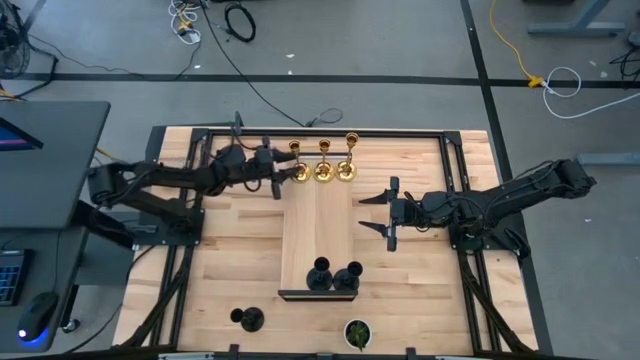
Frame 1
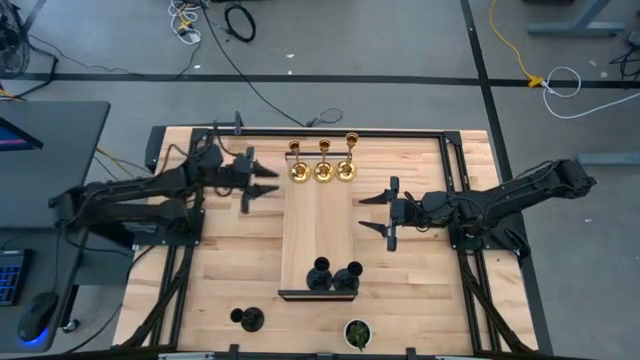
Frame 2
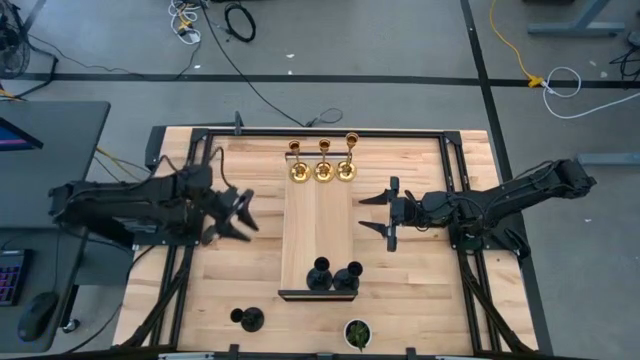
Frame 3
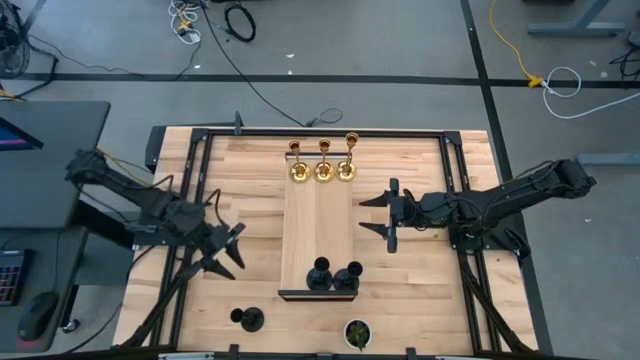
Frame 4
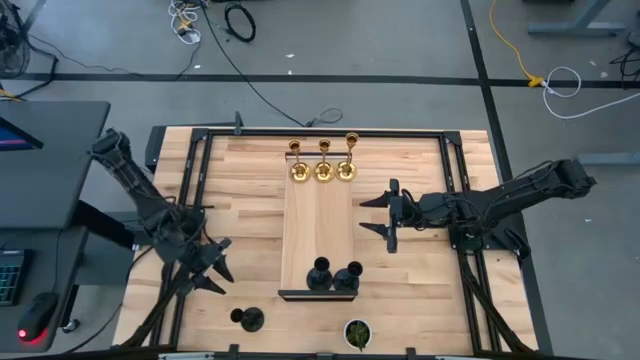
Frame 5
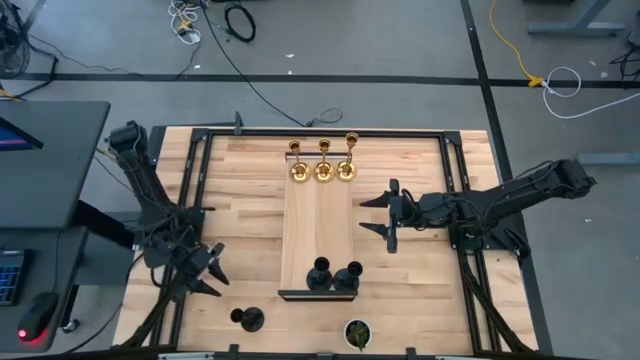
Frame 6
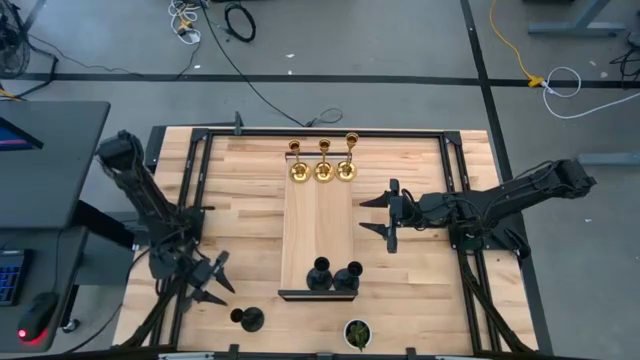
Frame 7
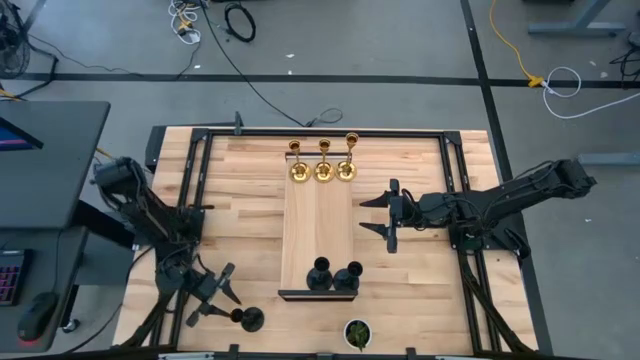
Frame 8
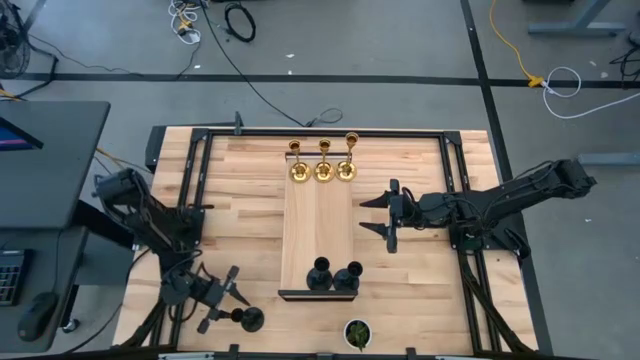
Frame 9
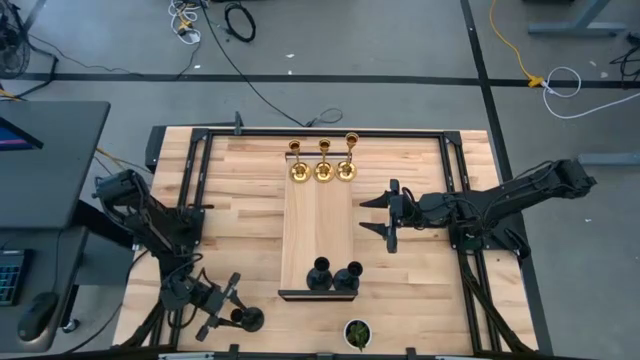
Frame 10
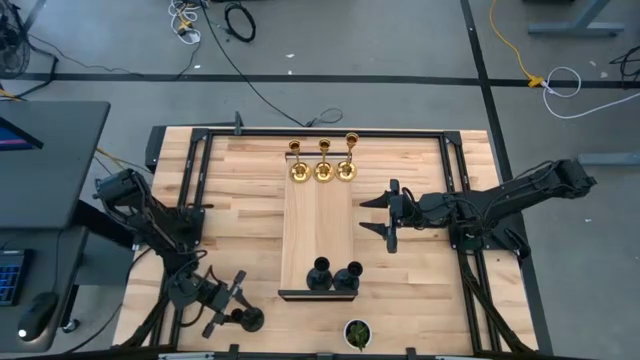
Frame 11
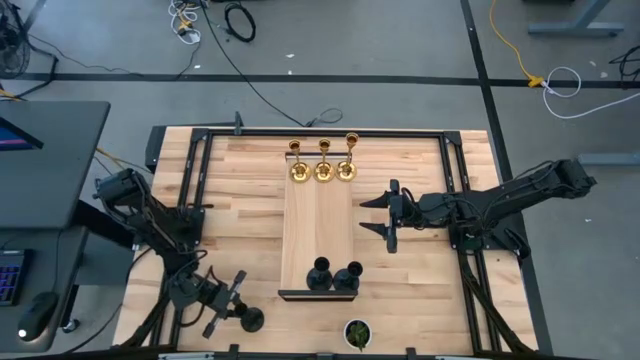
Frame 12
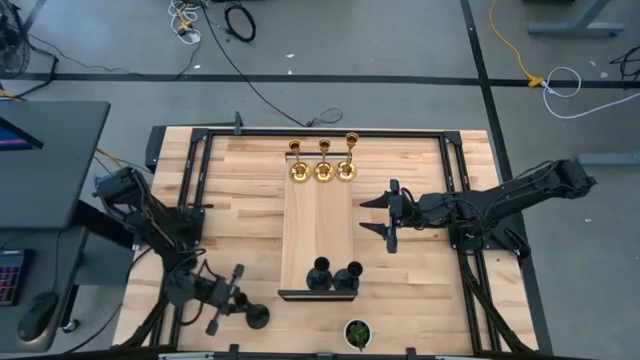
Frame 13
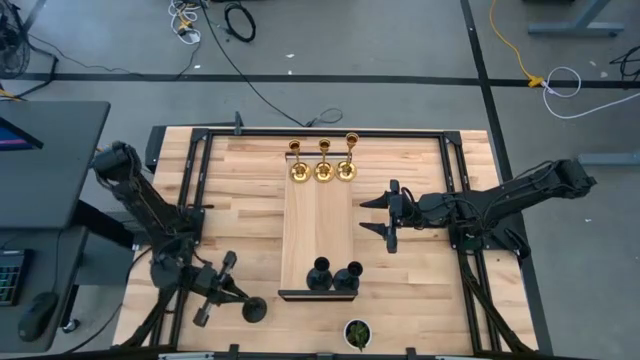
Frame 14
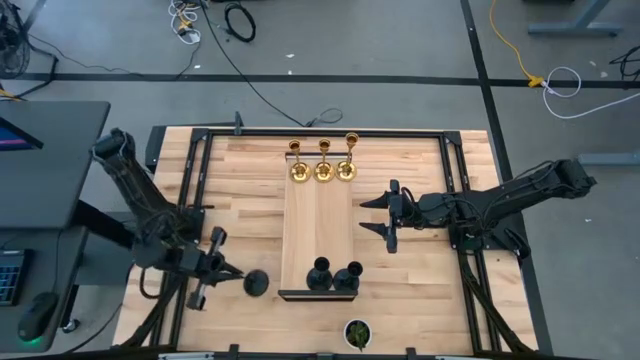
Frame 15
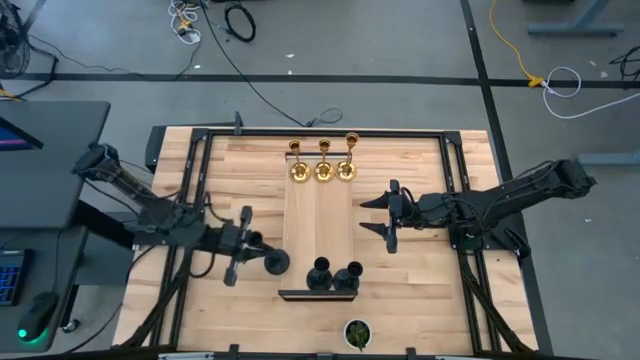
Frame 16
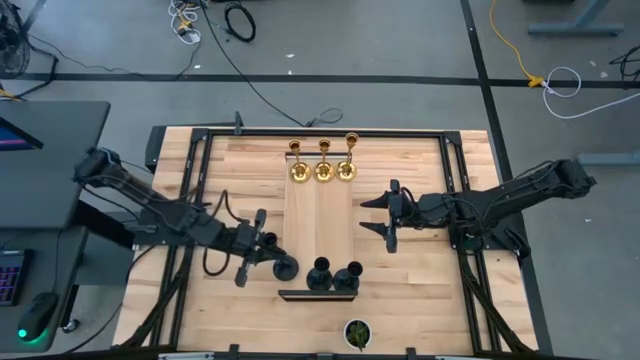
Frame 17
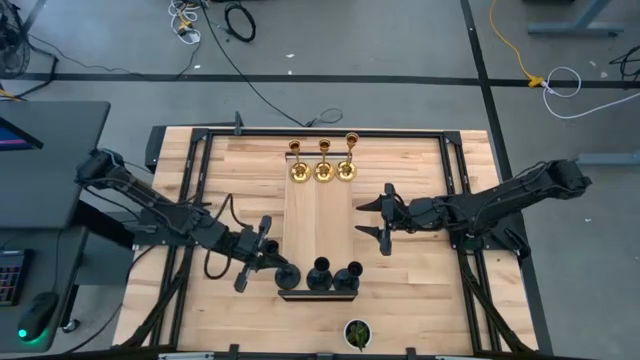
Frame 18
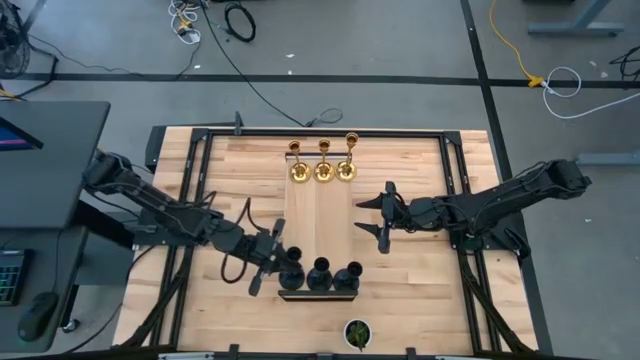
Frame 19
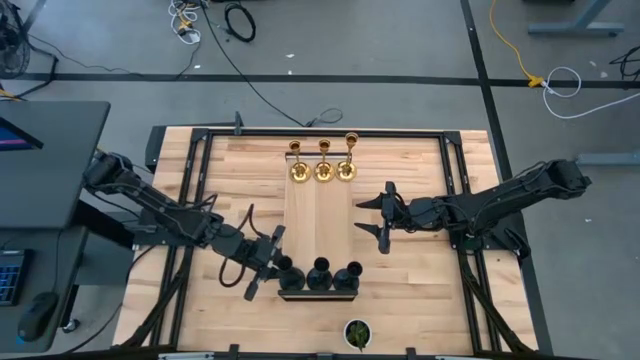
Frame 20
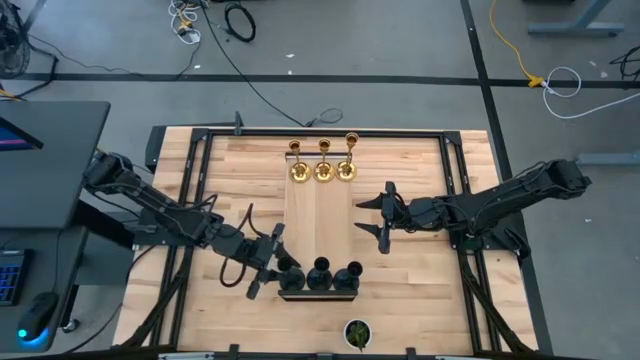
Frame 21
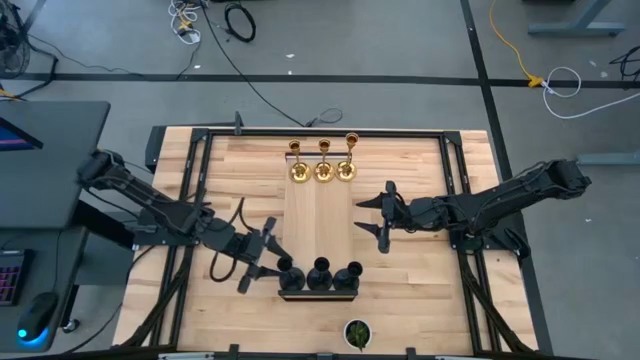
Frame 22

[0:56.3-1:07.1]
Task: Pick & Place candle stick holders
Put the black candle holder on the shelf aligned with the black candle holder

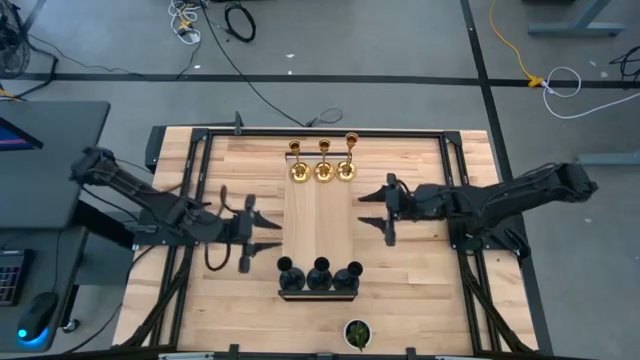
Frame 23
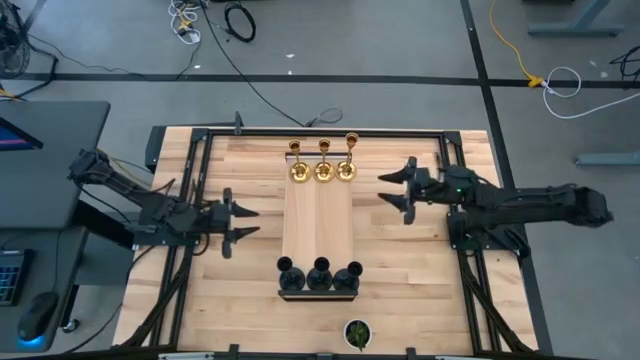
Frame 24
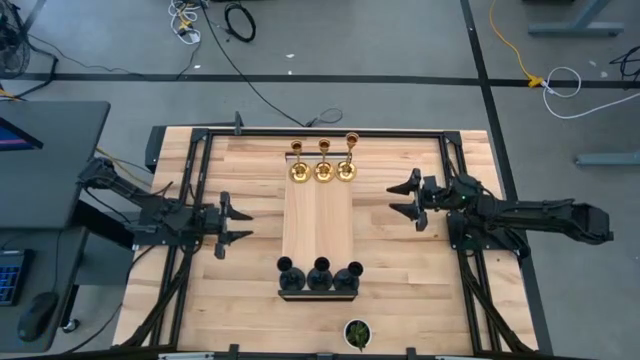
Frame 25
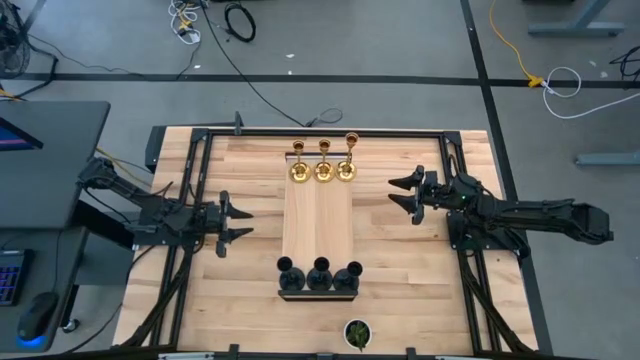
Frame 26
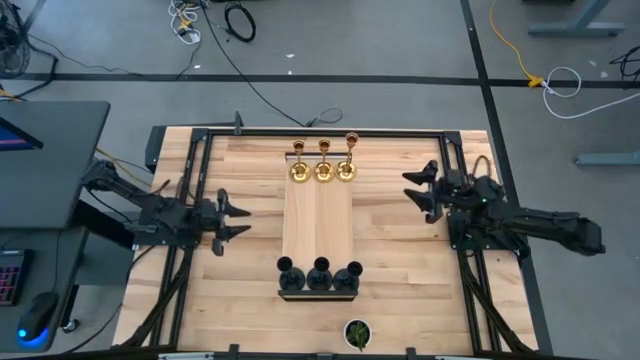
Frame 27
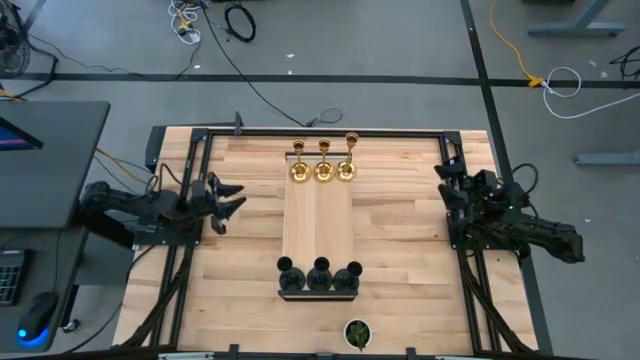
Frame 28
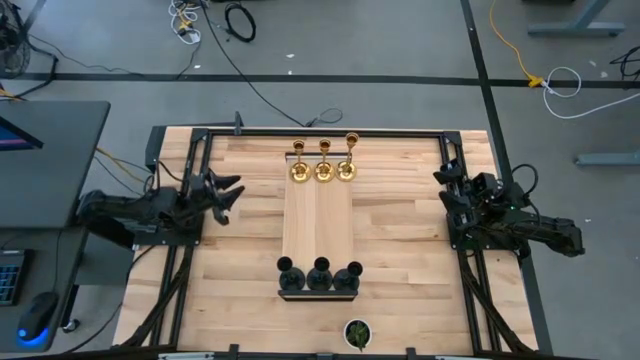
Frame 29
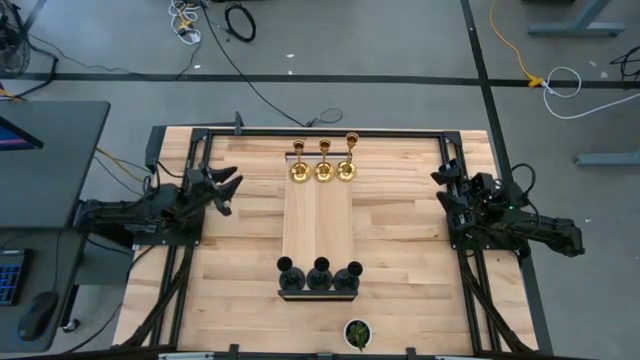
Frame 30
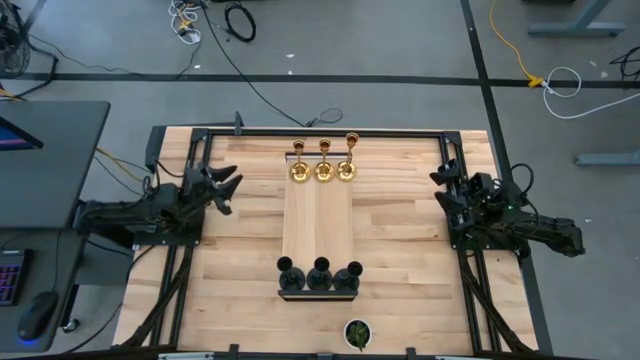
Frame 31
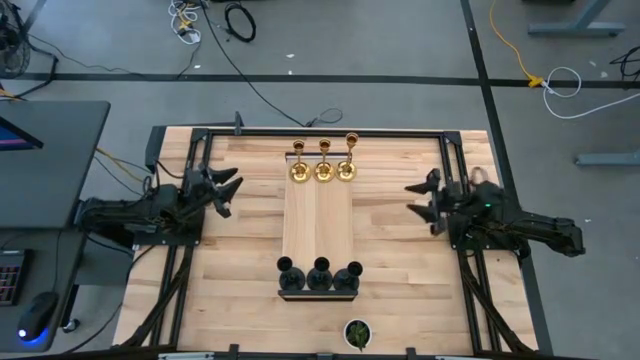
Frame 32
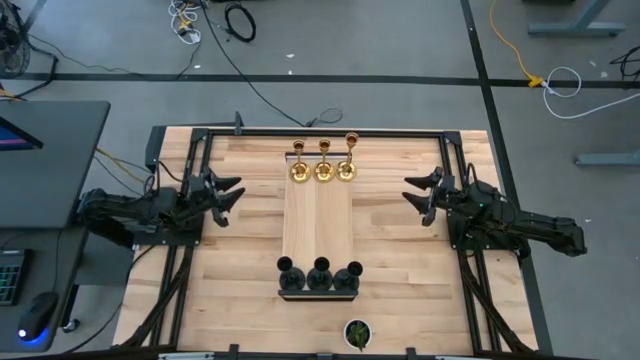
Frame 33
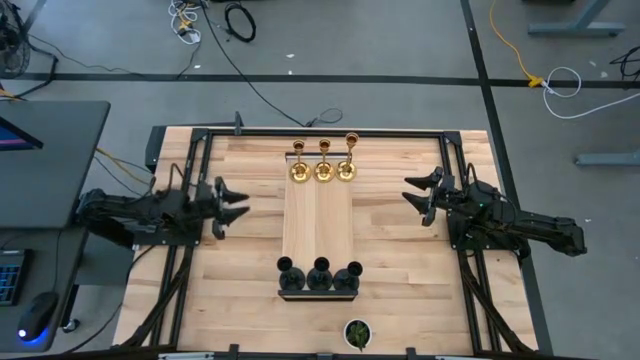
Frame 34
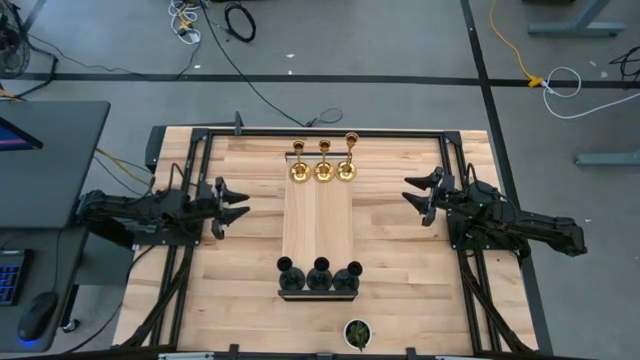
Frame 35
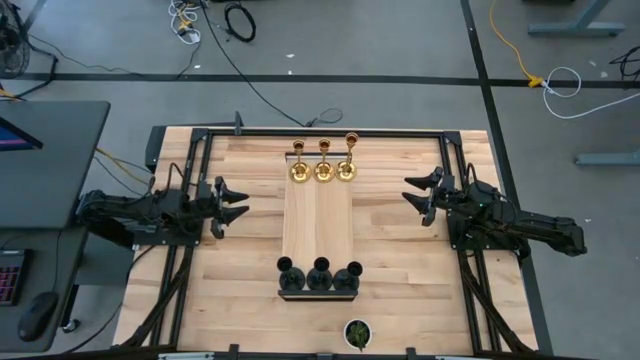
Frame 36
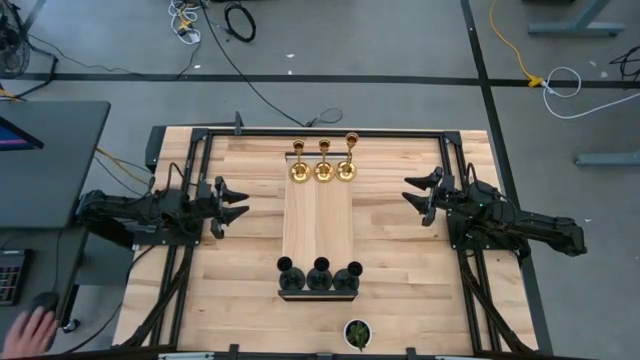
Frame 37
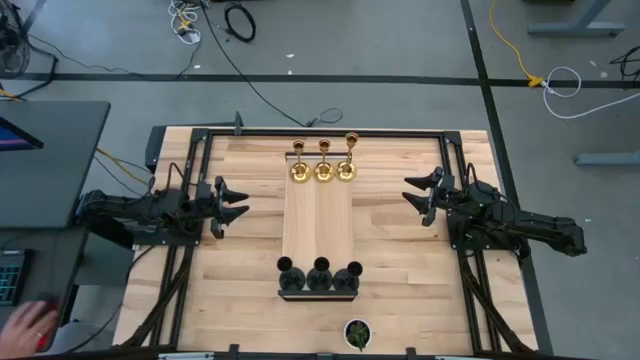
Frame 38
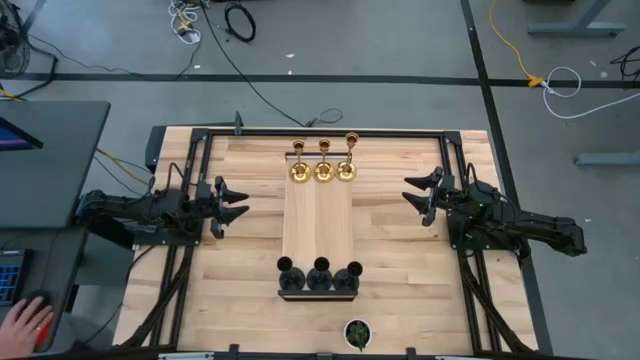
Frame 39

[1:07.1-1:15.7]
Return to Home Position
